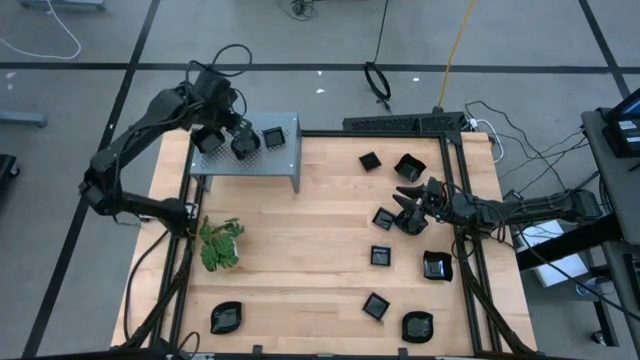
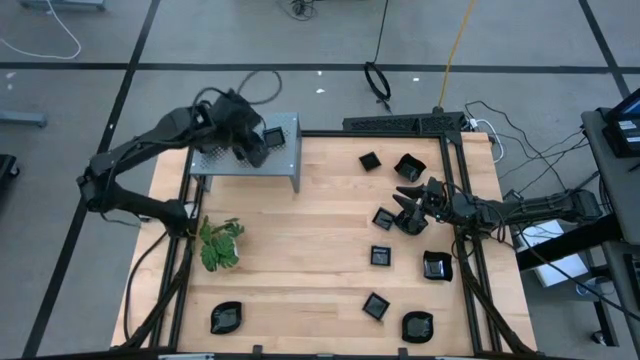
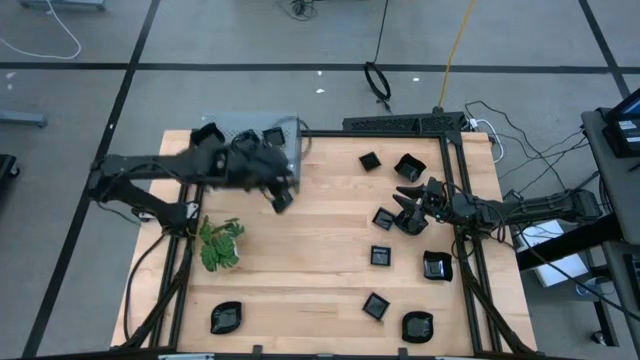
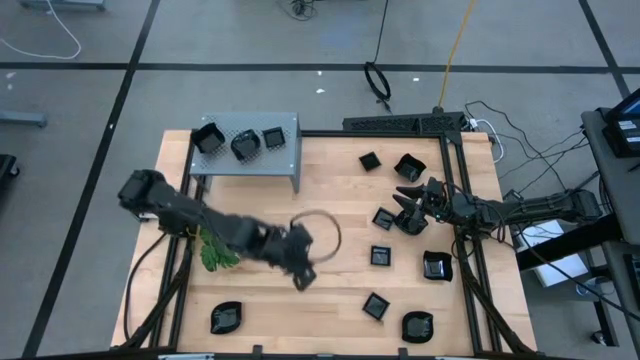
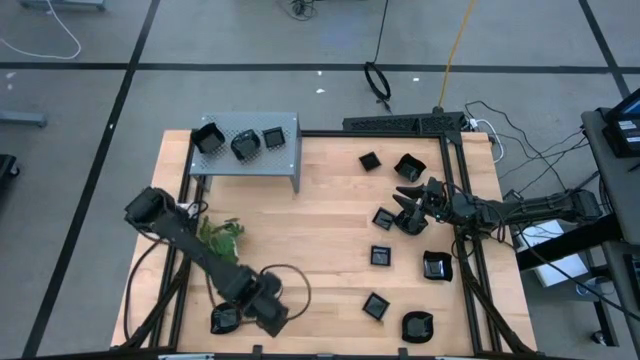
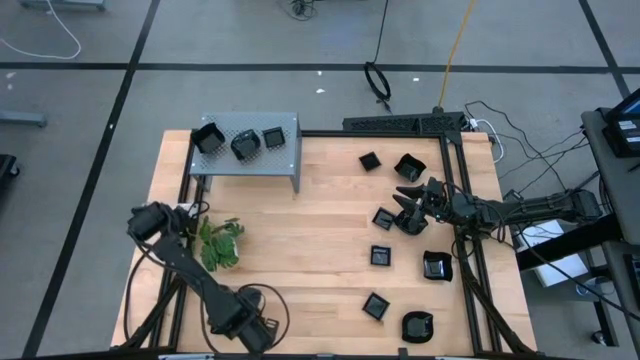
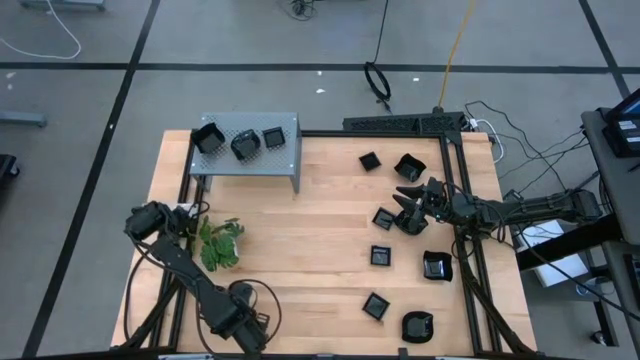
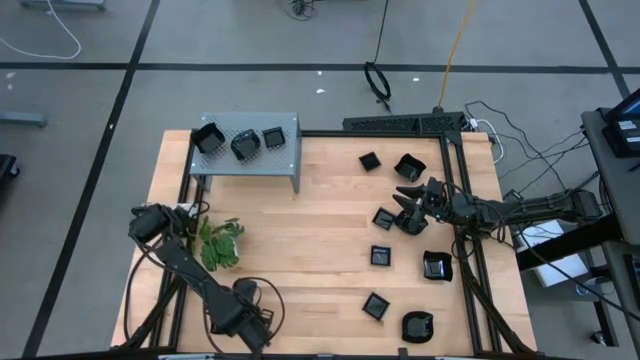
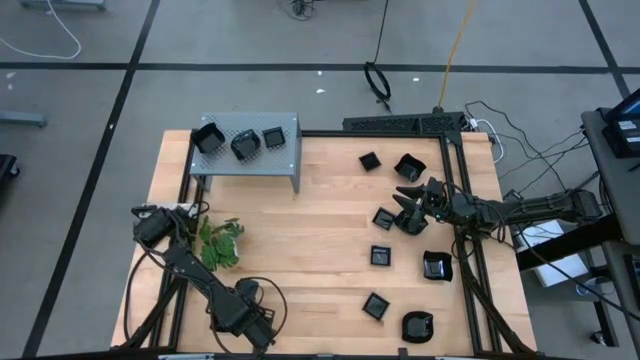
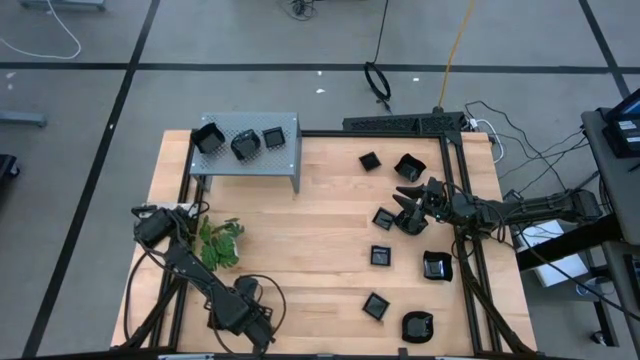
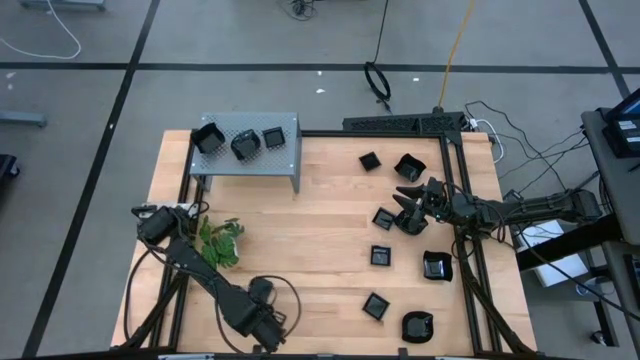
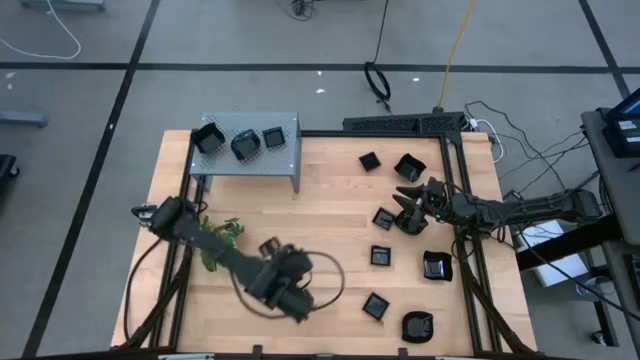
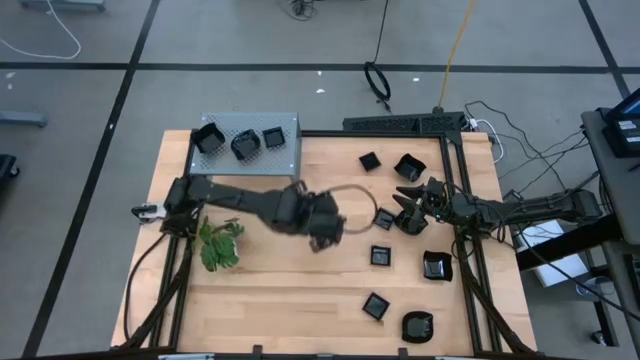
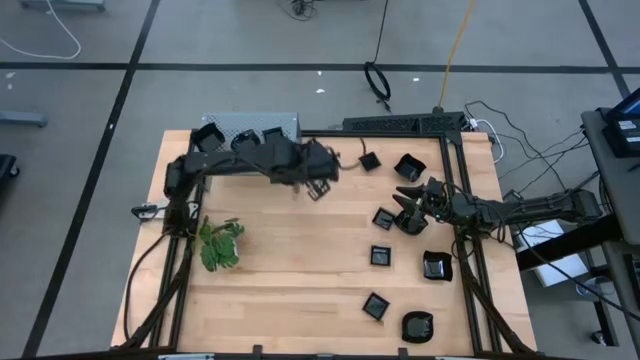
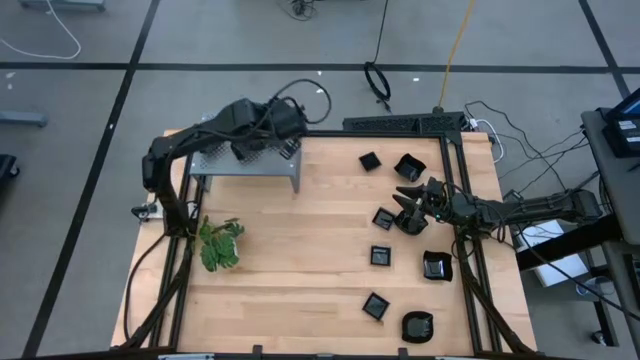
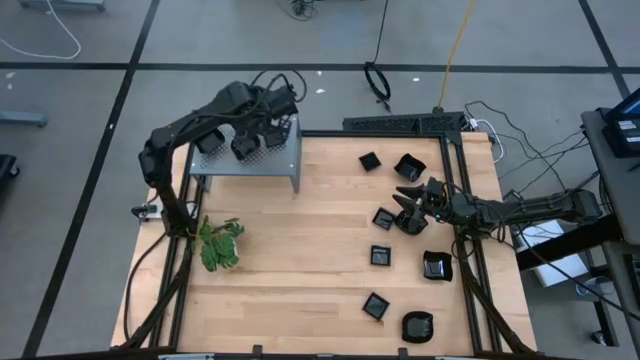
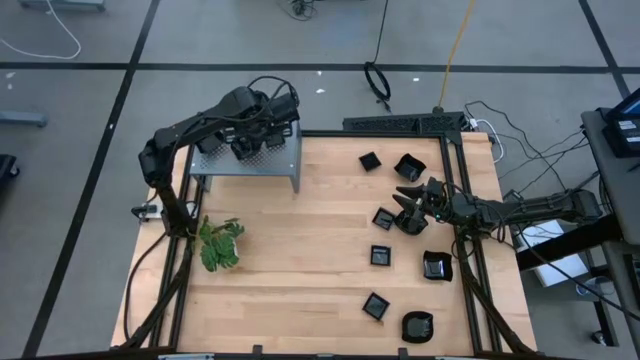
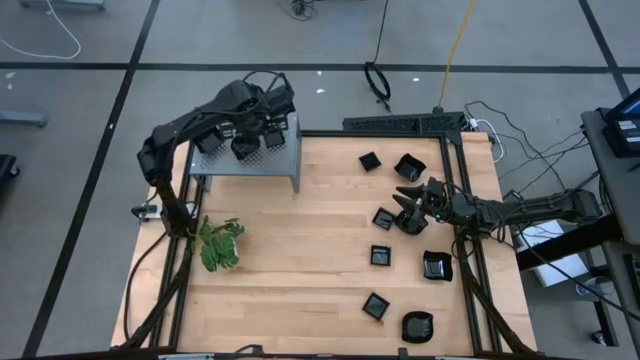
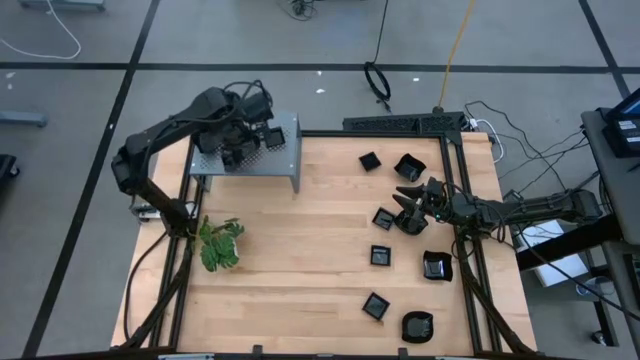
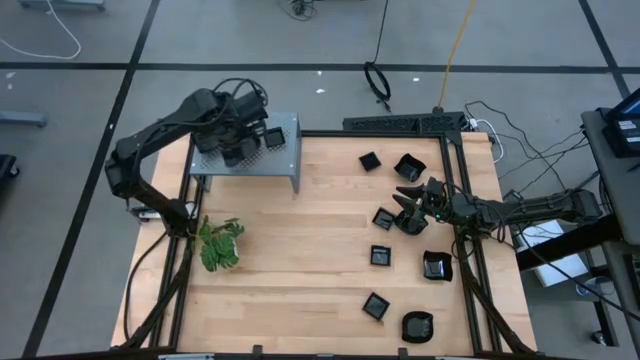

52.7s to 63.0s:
Task: Pick & Place Mini shaped plates
Stack the leaf shaped plate on top of the leaf plate on the shelf

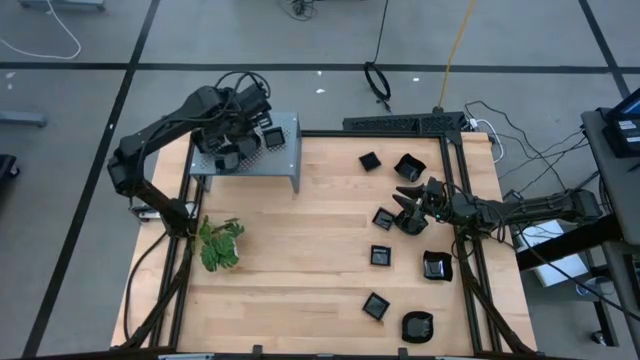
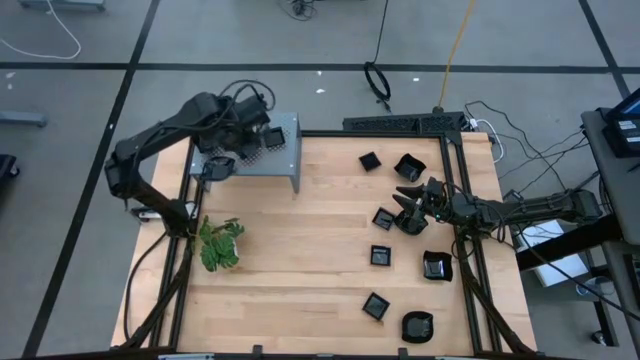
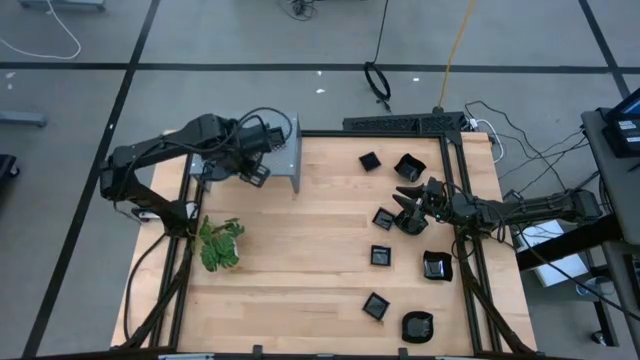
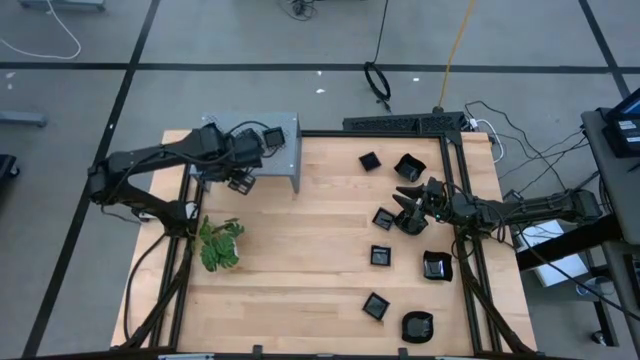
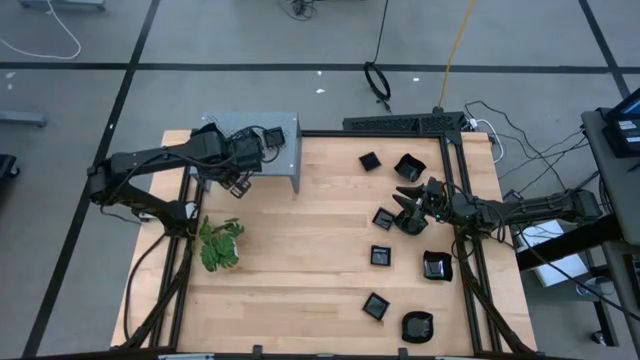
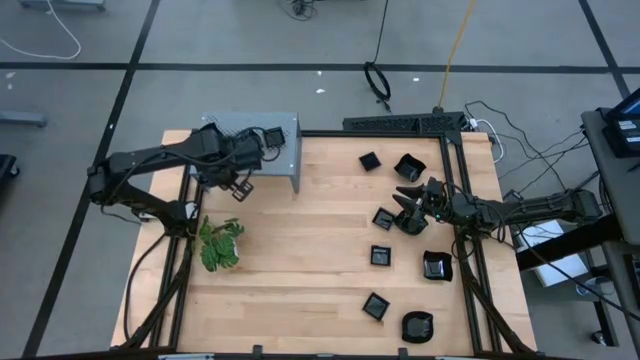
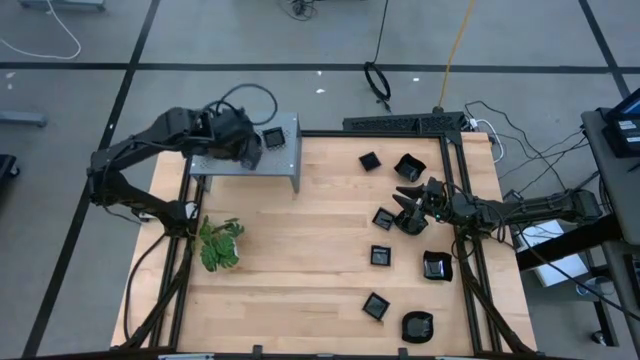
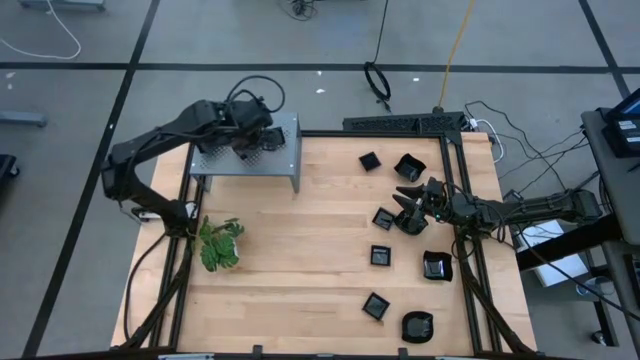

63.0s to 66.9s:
Stack the leaf shaped plate on top of the leaf plate on the shelf

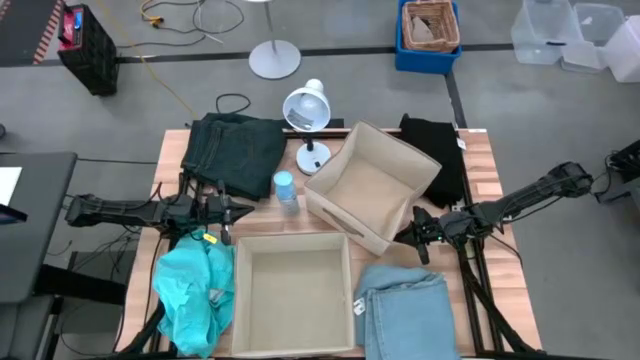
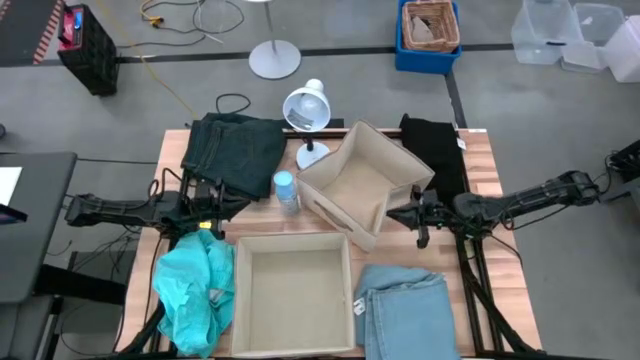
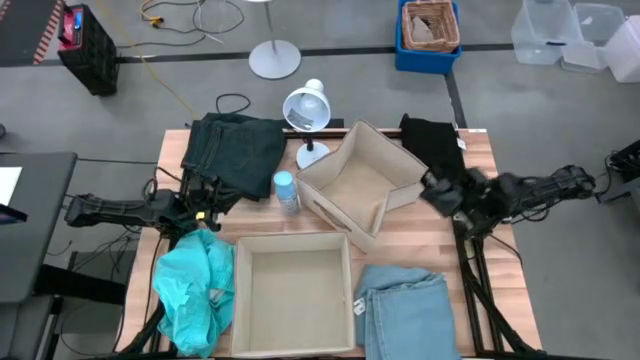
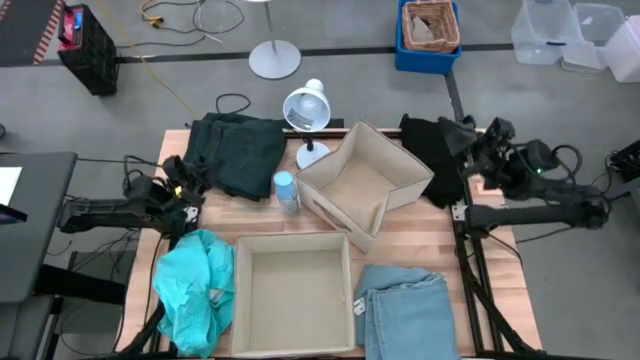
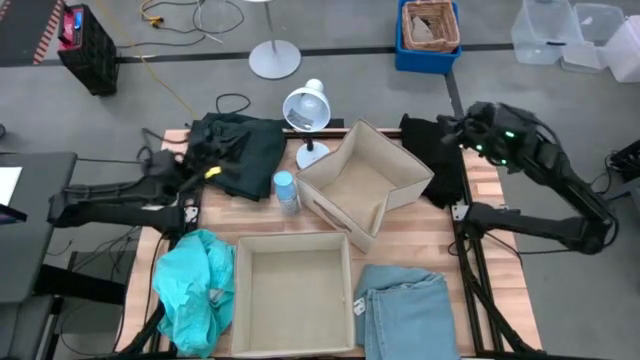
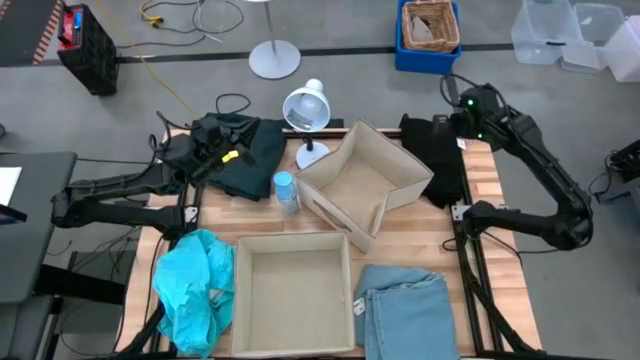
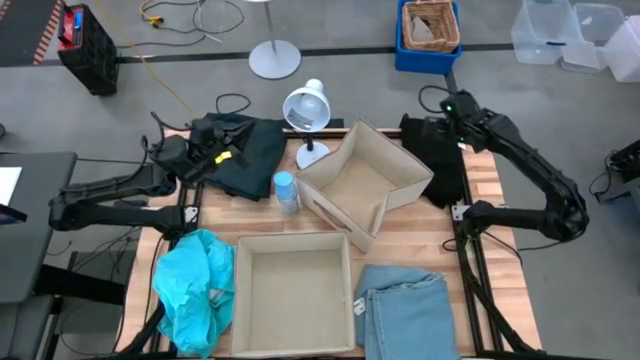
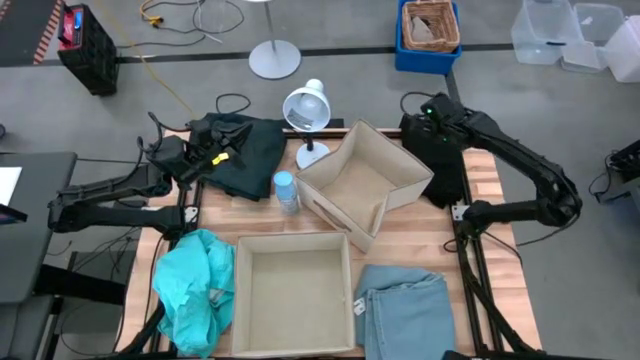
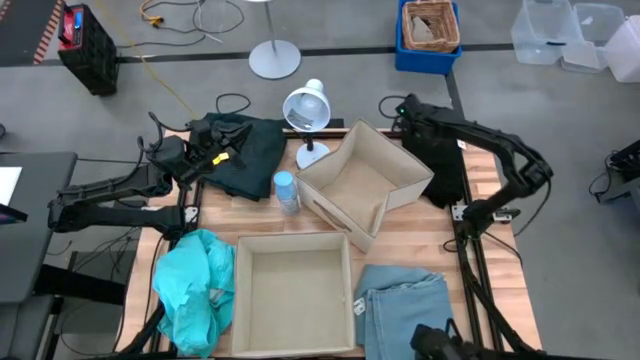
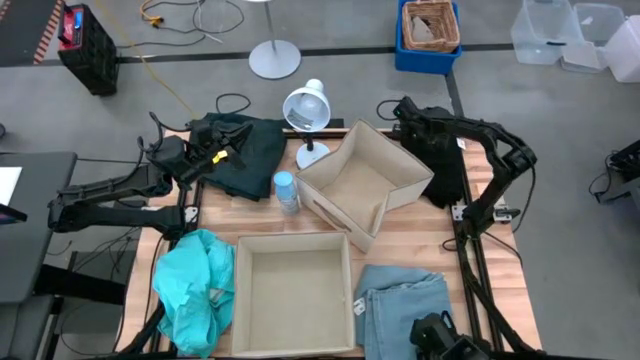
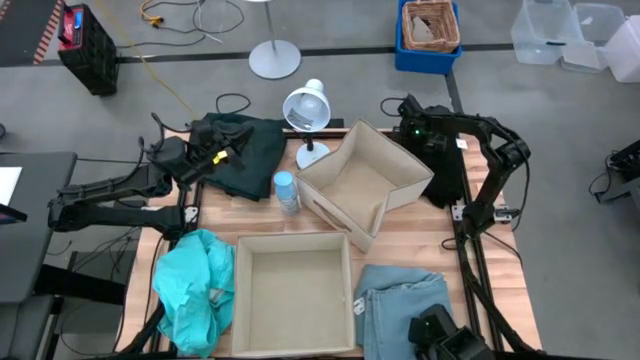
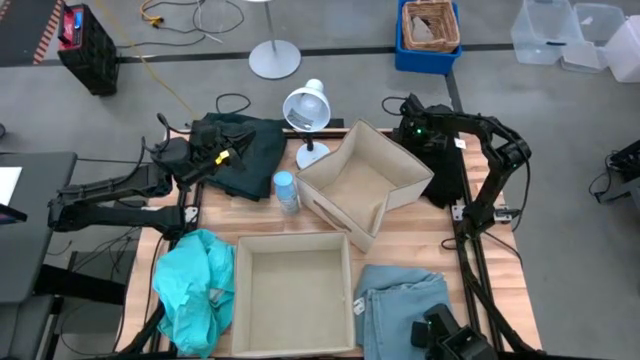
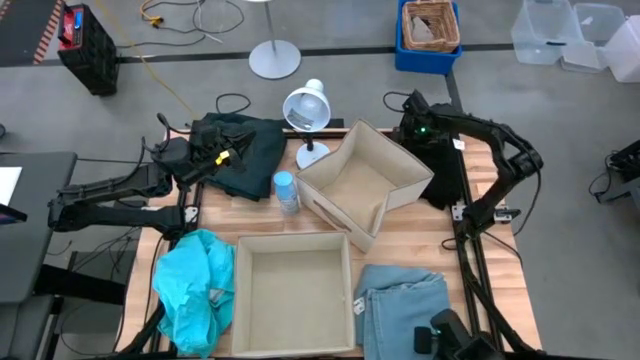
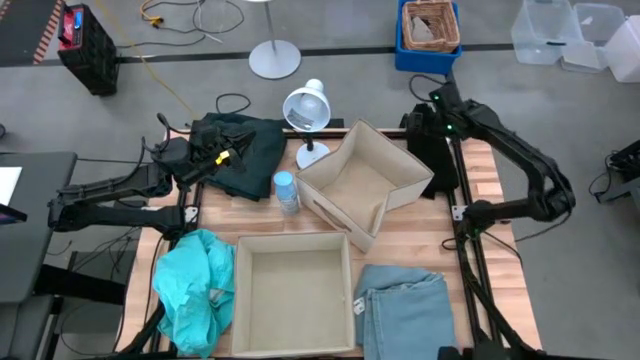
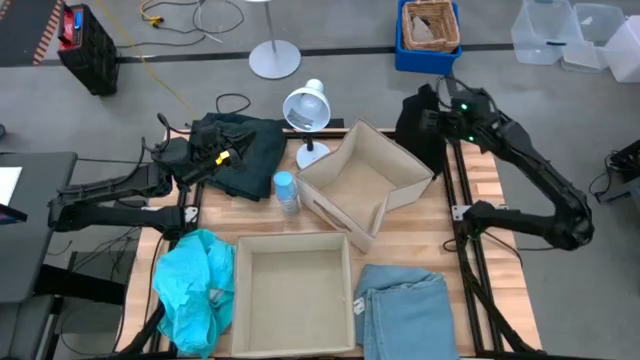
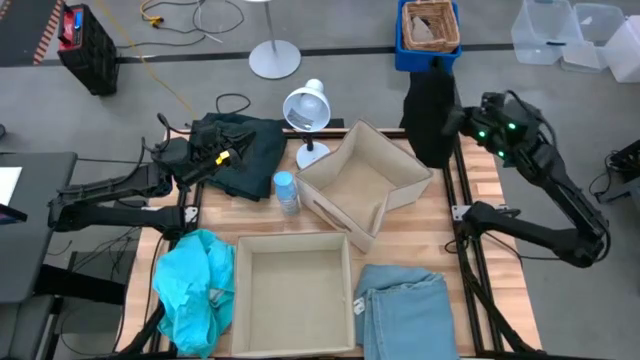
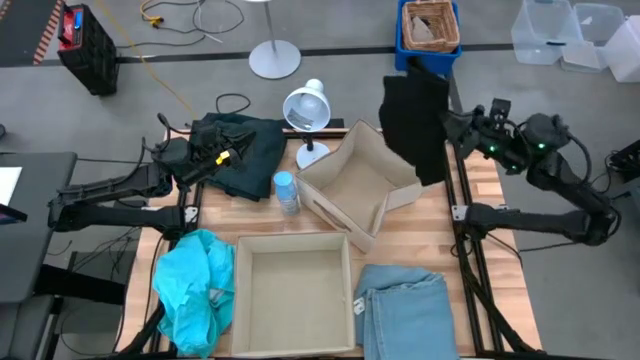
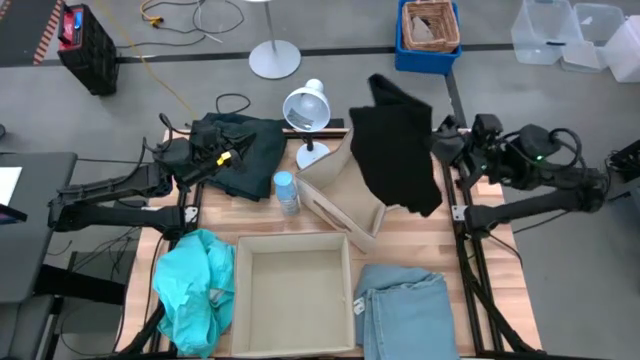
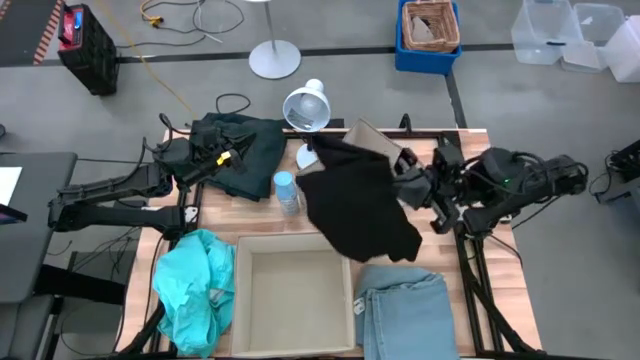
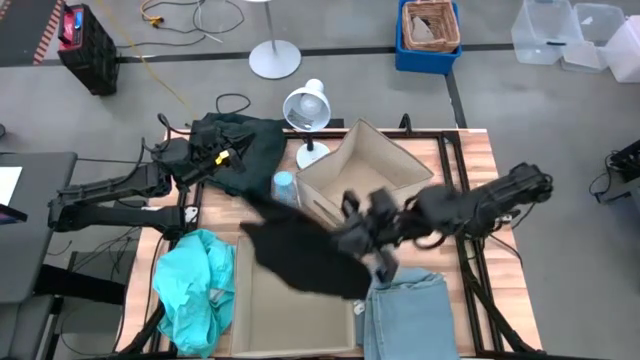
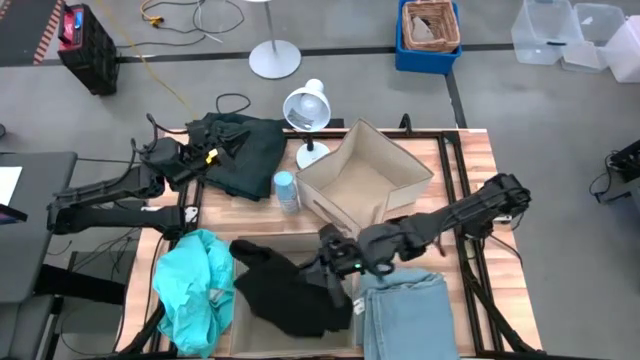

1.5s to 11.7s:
Task: Sort clothes
Put the black shirt into the bottom laundry bin
